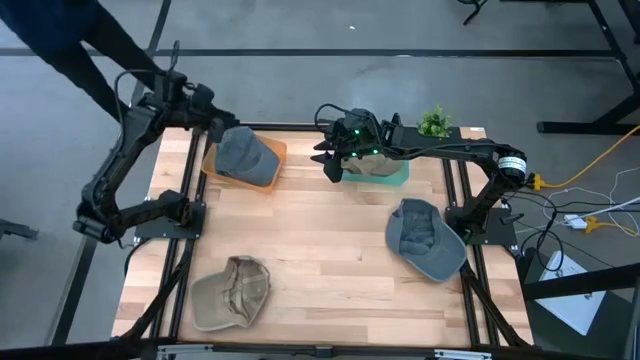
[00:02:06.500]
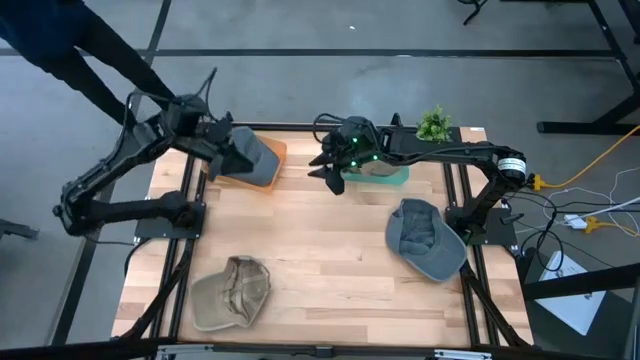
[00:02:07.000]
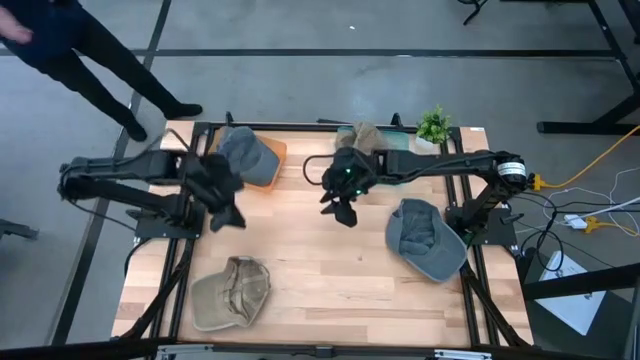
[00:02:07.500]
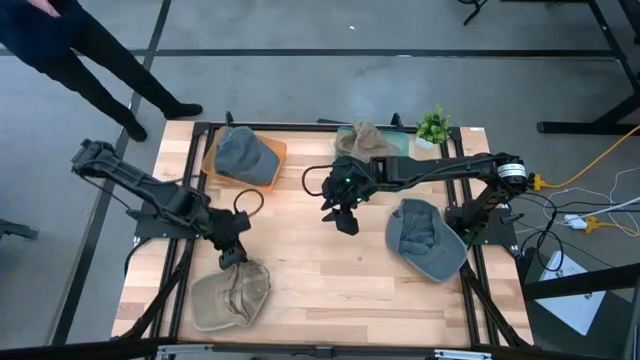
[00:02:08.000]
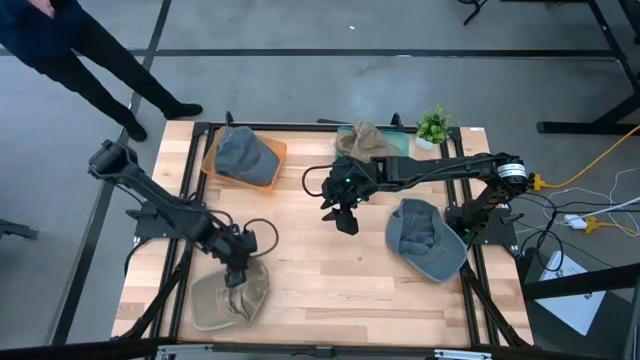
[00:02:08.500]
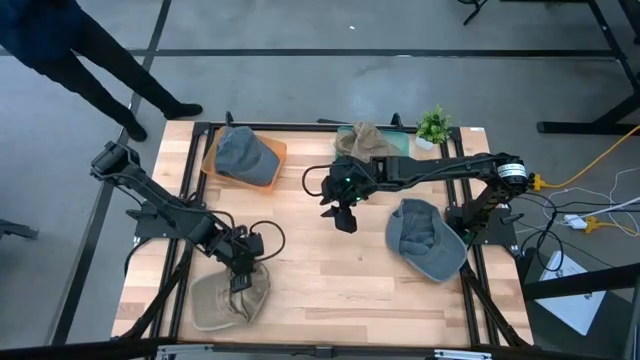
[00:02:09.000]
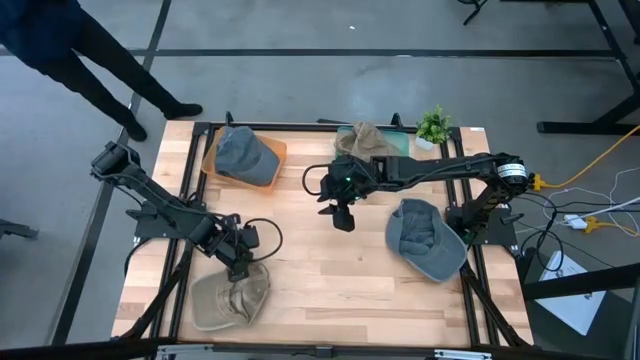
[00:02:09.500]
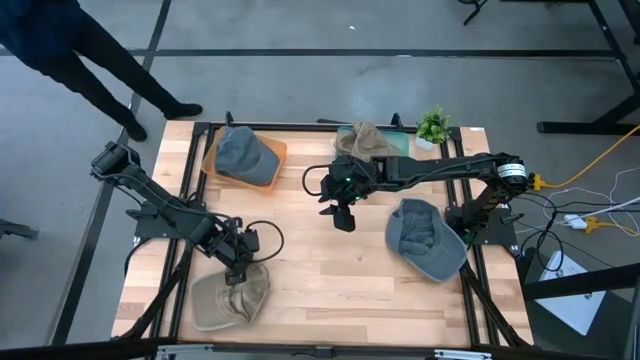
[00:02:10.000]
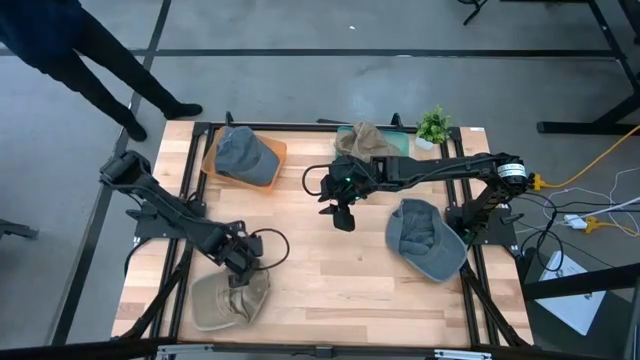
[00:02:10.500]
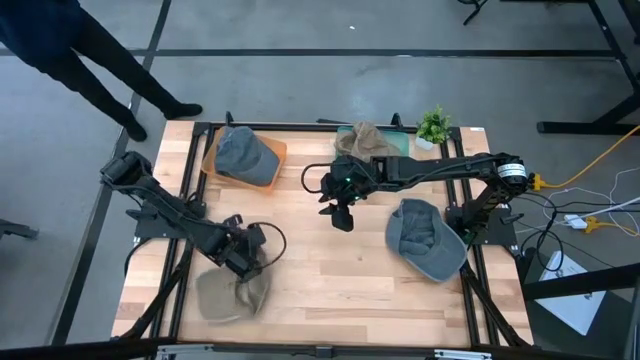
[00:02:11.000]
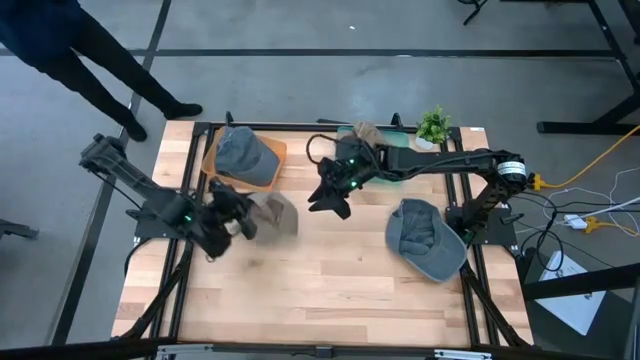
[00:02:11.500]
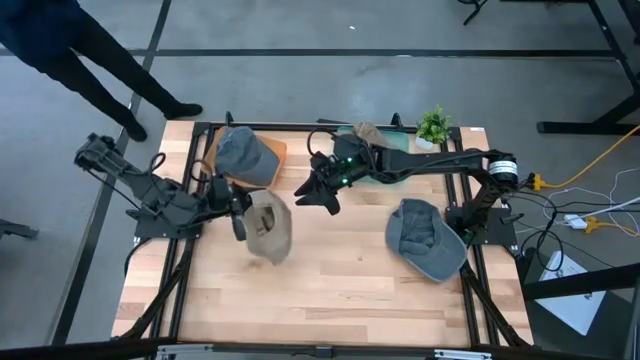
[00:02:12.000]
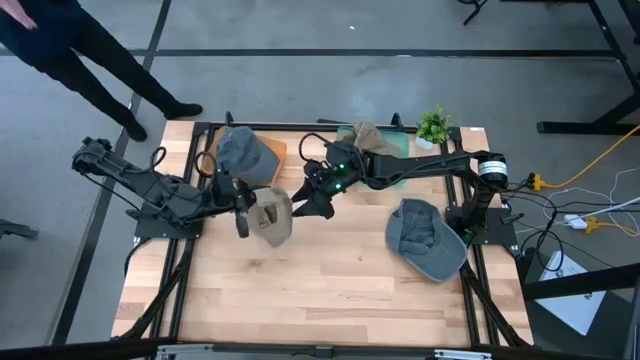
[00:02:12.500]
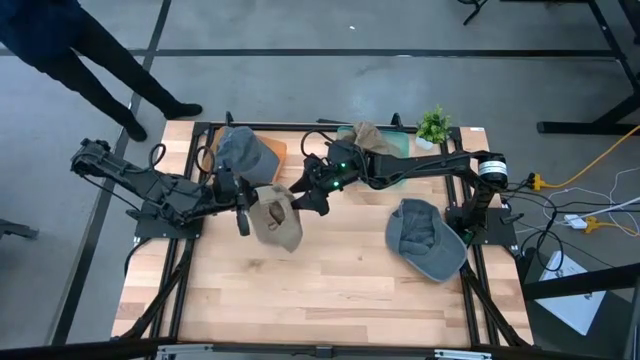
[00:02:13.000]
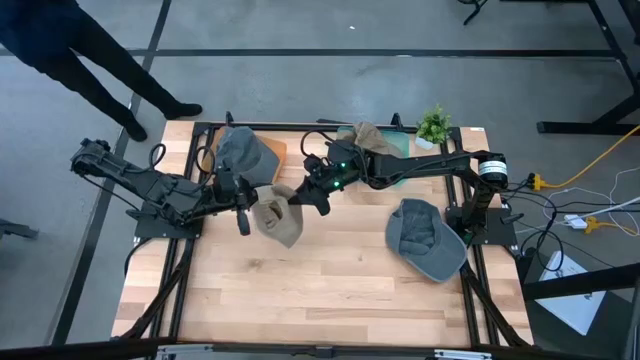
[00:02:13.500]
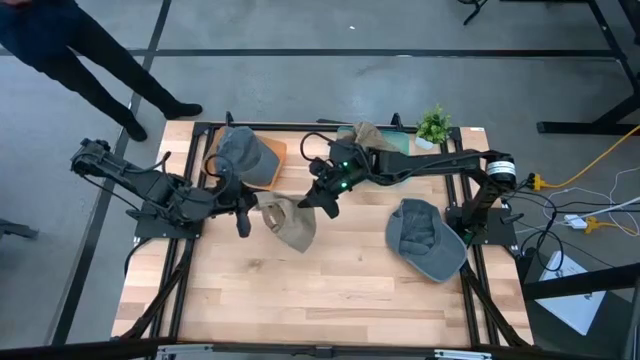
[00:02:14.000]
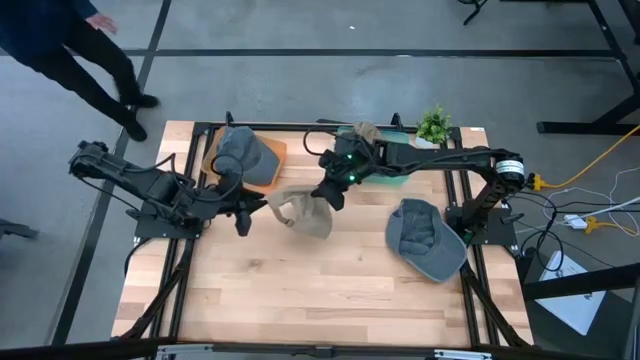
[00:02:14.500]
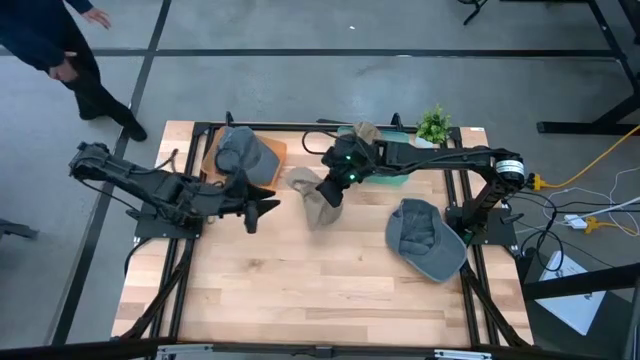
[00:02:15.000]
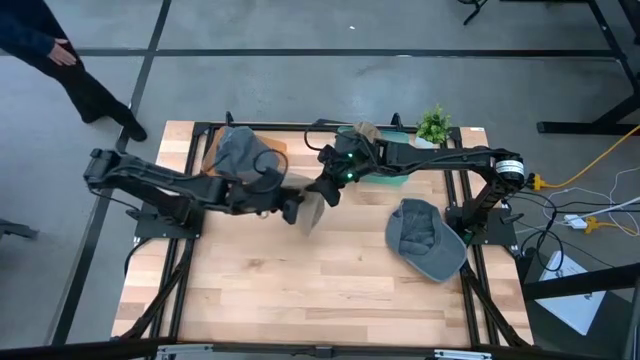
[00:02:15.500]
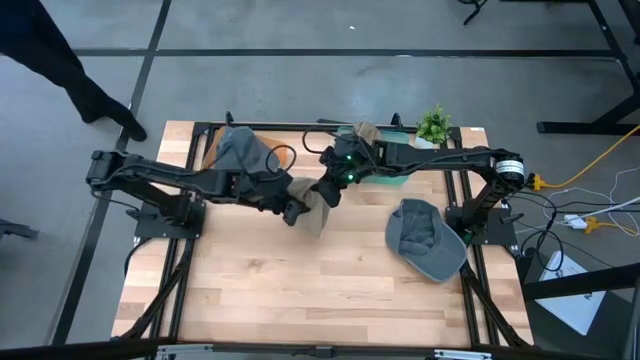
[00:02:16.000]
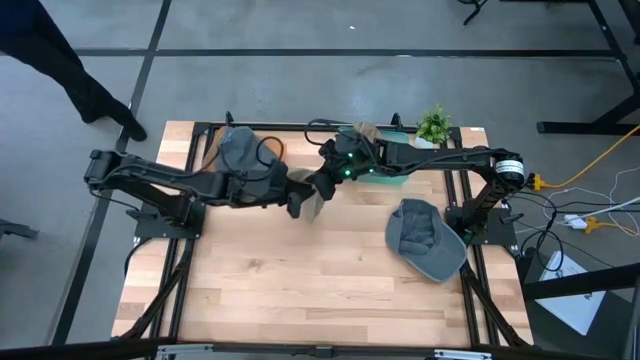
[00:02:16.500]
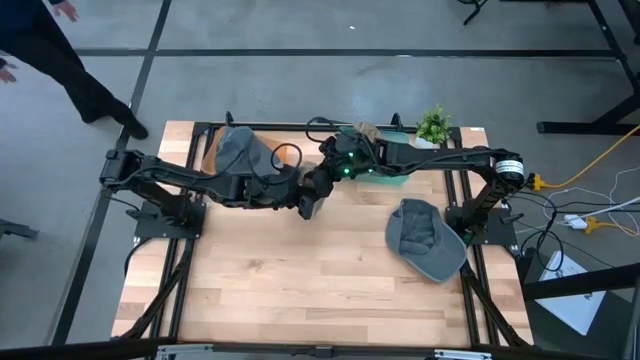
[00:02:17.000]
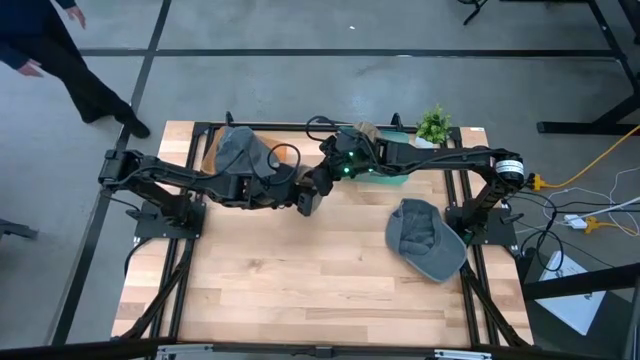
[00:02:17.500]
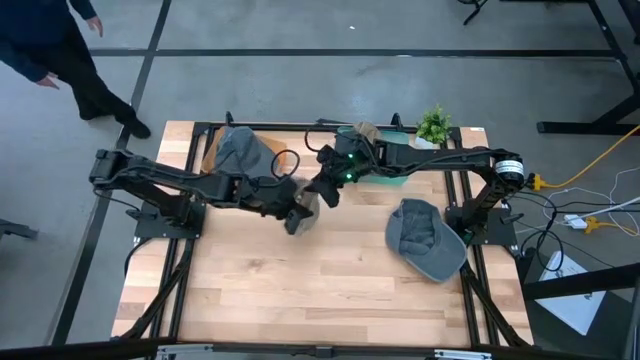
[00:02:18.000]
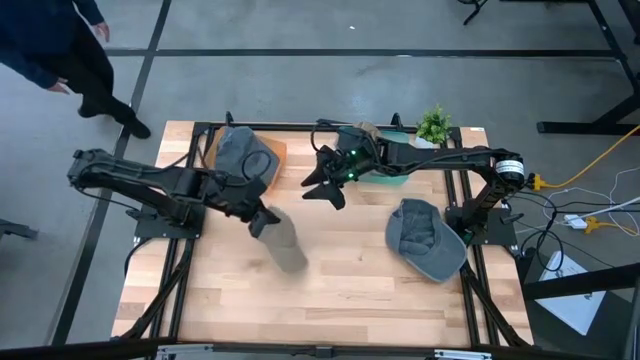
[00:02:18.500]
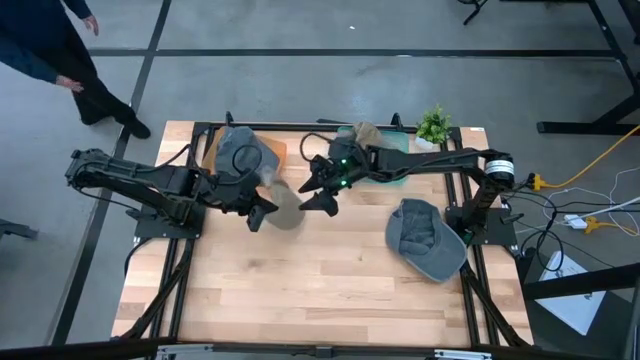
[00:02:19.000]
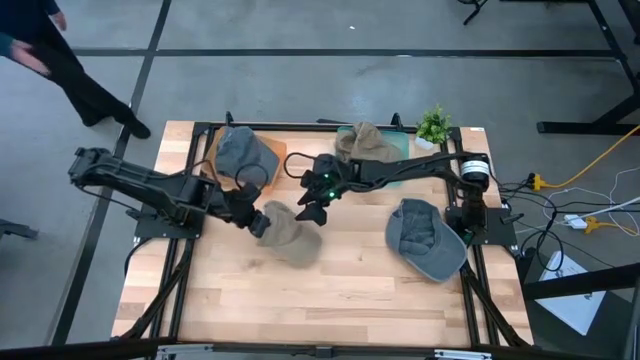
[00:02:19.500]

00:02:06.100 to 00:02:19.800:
Task: Pick & Place hat
Put the brown cap into the green bin

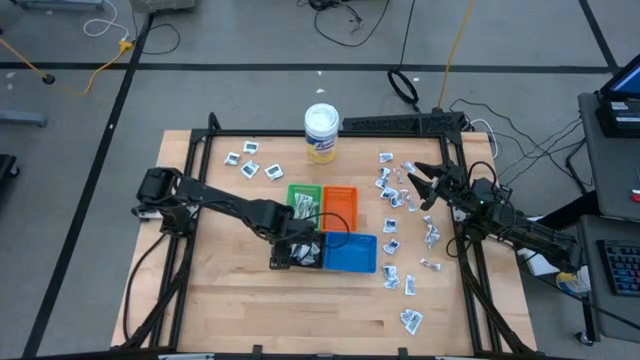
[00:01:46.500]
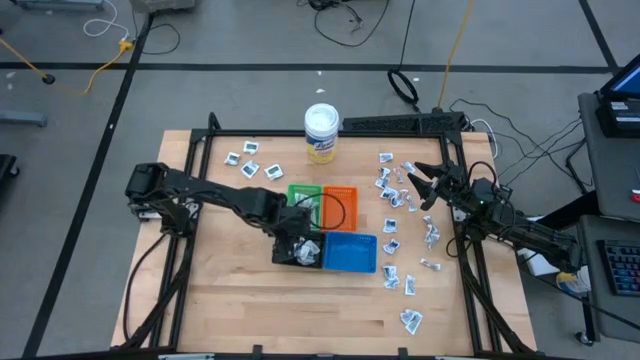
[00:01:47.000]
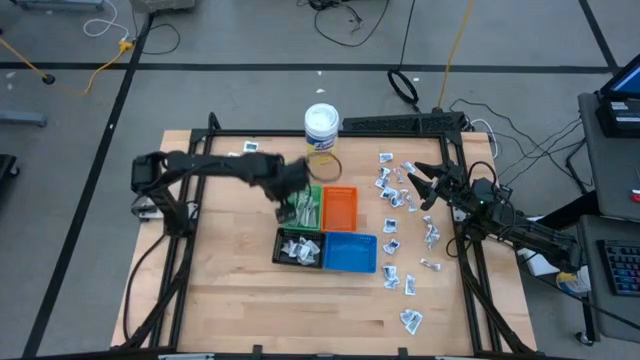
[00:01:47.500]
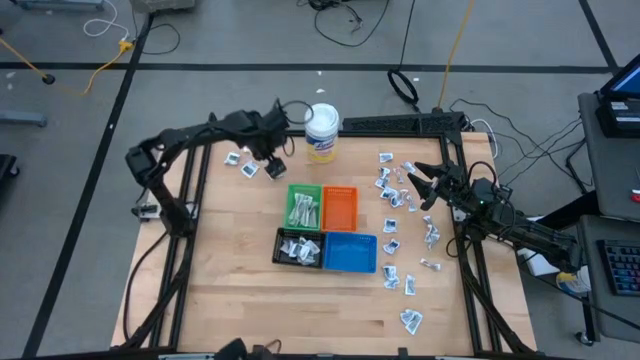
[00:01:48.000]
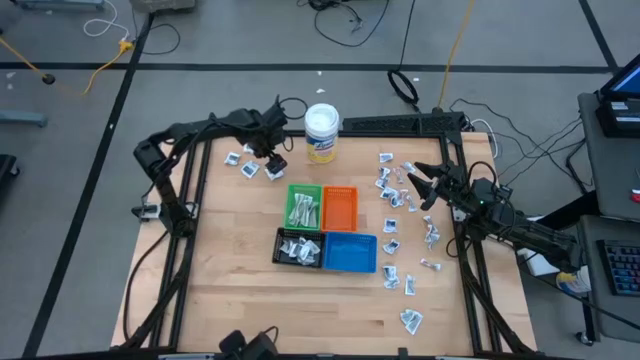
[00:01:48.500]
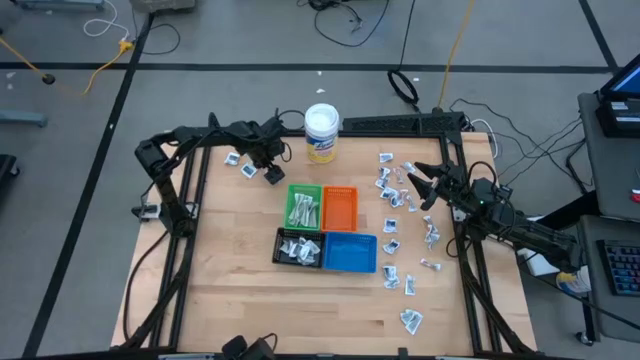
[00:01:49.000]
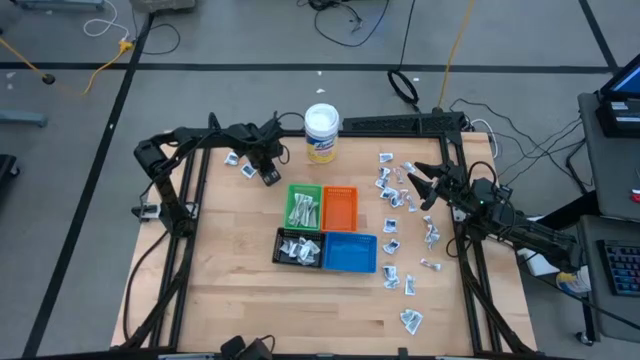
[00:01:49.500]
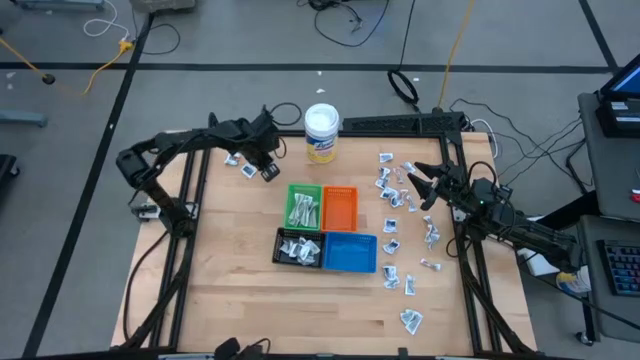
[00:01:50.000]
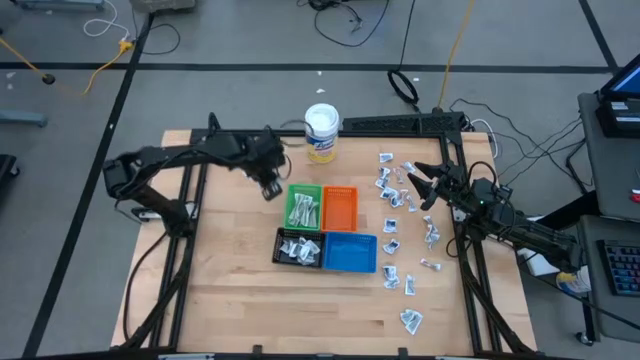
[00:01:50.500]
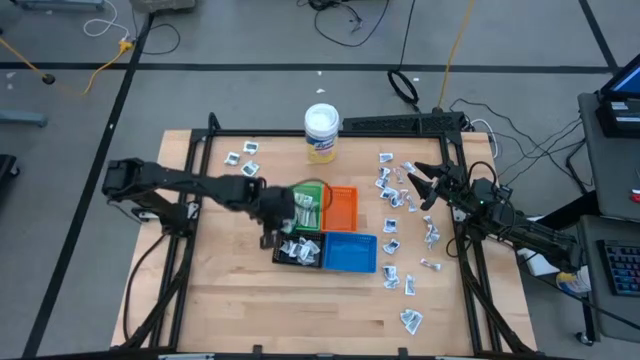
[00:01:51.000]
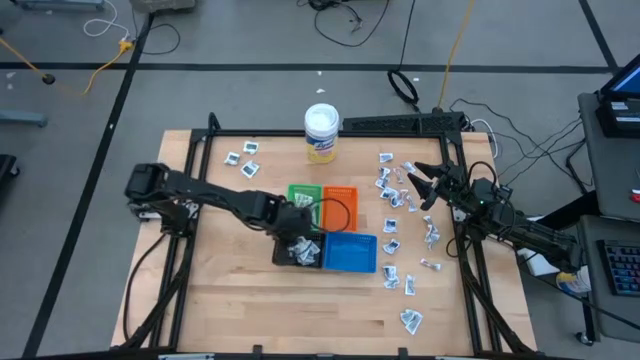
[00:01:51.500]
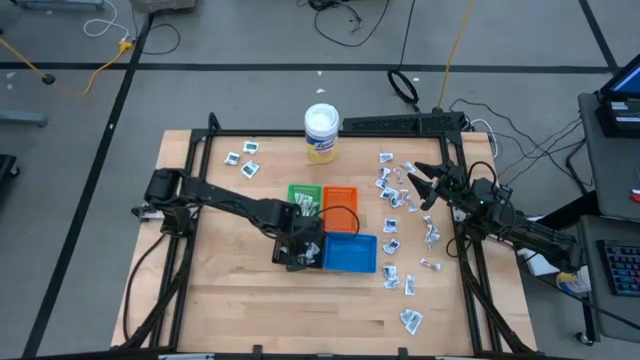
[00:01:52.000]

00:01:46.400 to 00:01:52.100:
Task: Pick & Place First Aid Supplies
Put the towelette pack into the black bin
